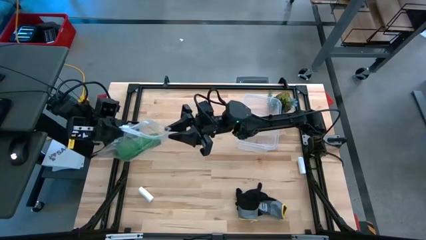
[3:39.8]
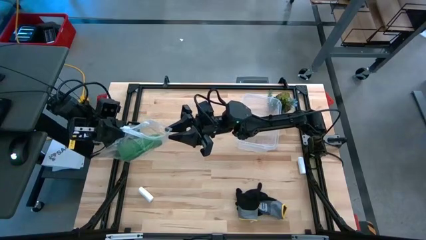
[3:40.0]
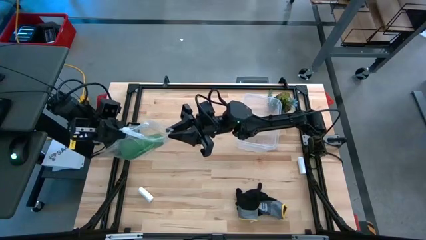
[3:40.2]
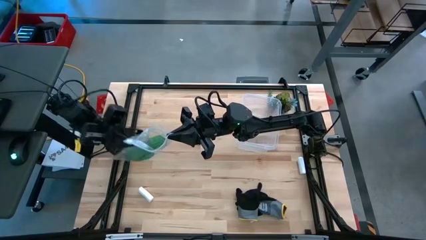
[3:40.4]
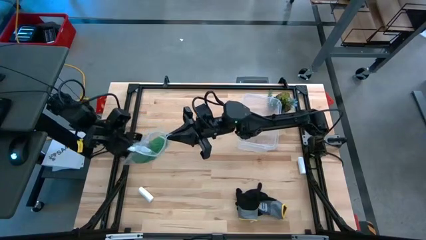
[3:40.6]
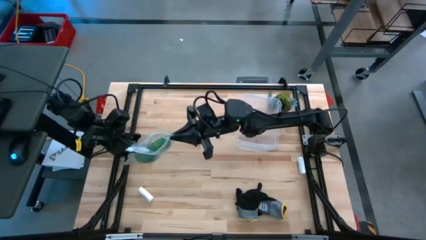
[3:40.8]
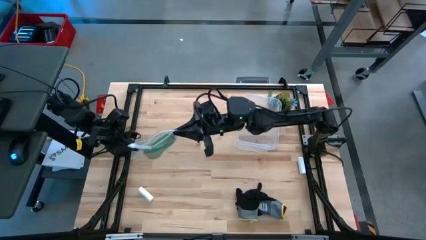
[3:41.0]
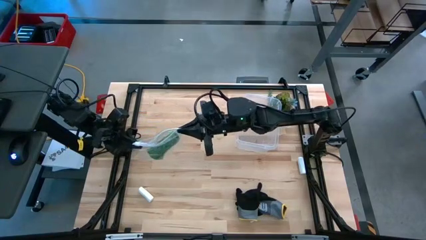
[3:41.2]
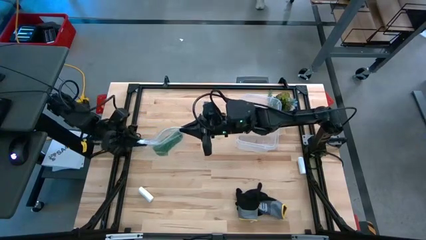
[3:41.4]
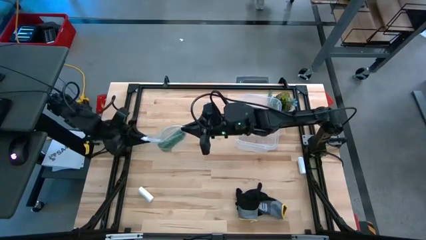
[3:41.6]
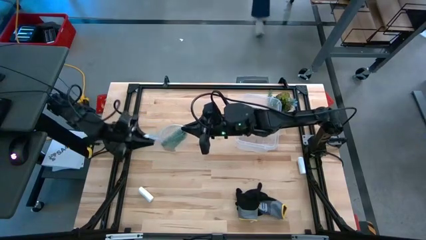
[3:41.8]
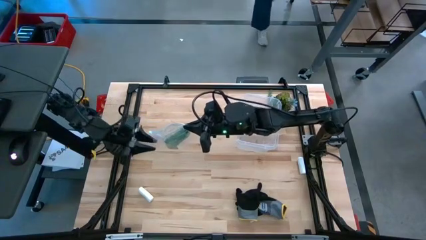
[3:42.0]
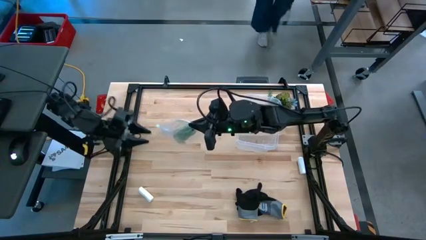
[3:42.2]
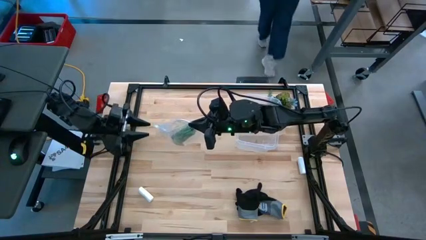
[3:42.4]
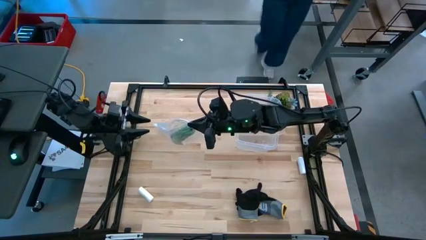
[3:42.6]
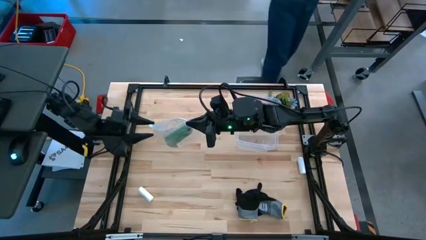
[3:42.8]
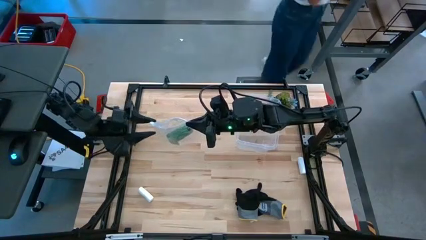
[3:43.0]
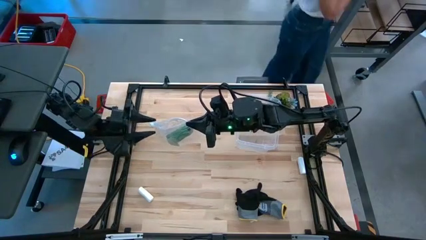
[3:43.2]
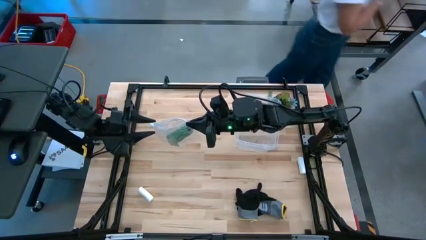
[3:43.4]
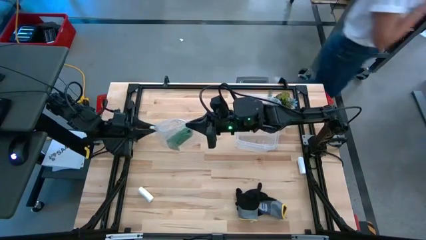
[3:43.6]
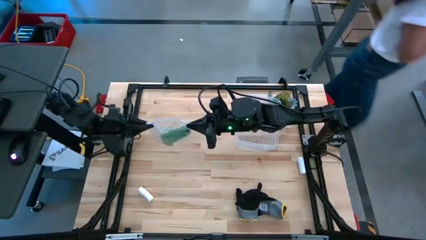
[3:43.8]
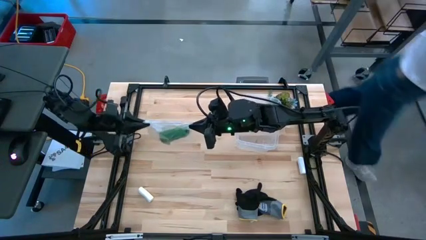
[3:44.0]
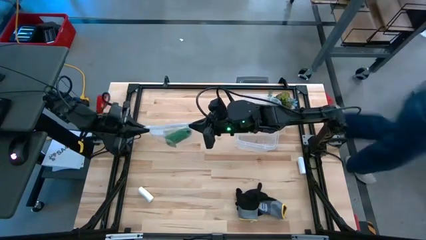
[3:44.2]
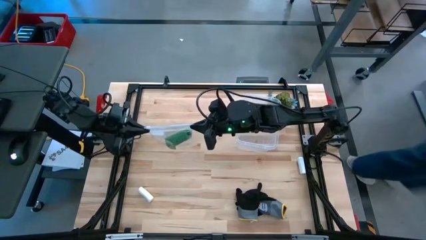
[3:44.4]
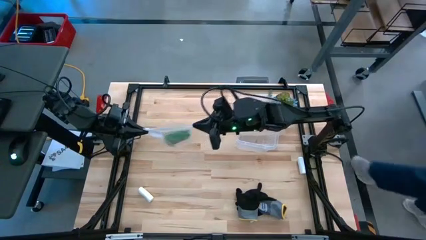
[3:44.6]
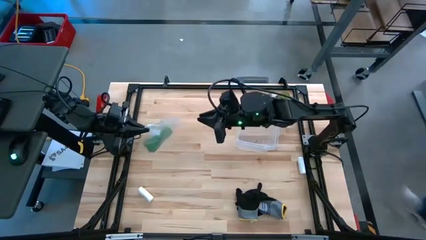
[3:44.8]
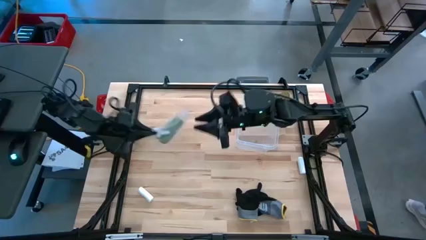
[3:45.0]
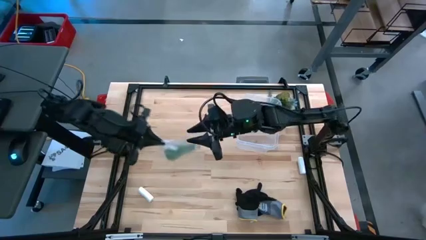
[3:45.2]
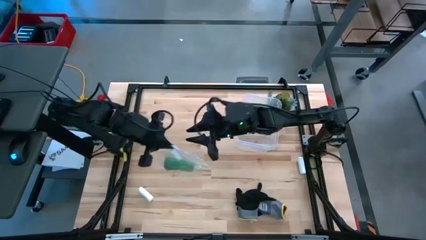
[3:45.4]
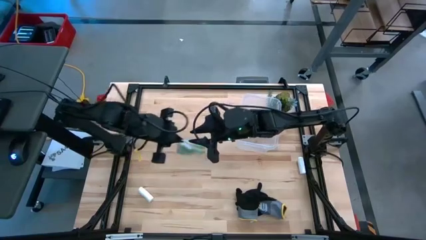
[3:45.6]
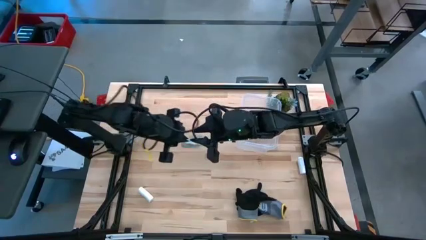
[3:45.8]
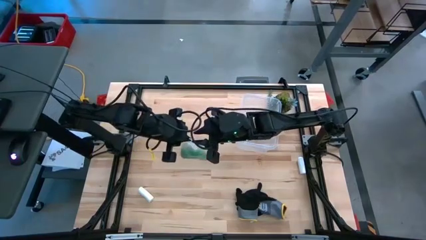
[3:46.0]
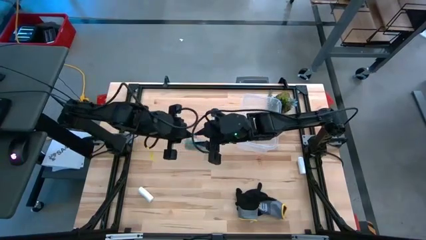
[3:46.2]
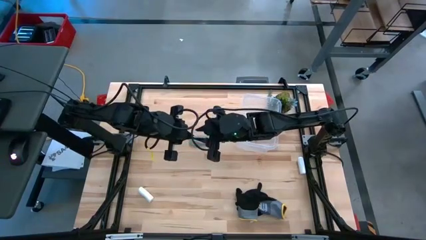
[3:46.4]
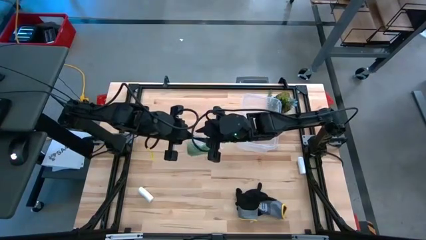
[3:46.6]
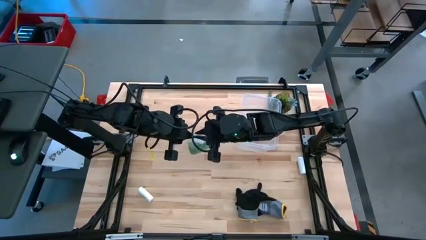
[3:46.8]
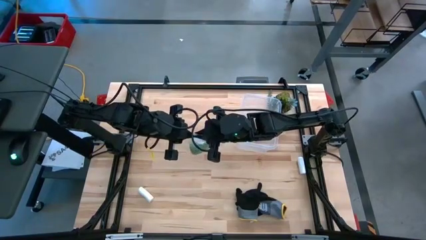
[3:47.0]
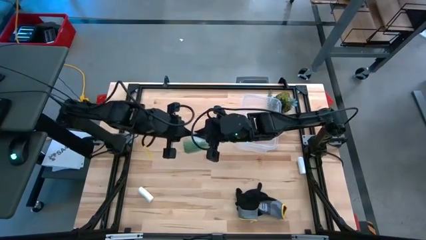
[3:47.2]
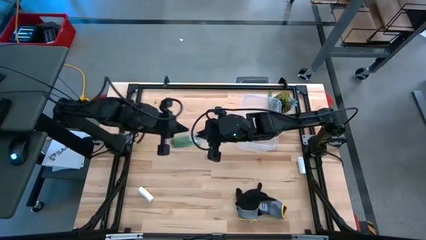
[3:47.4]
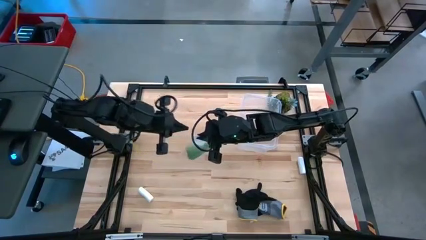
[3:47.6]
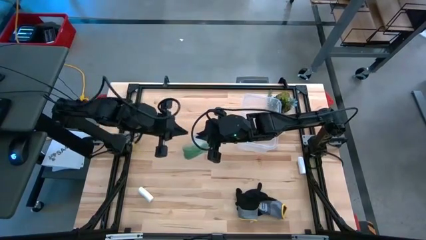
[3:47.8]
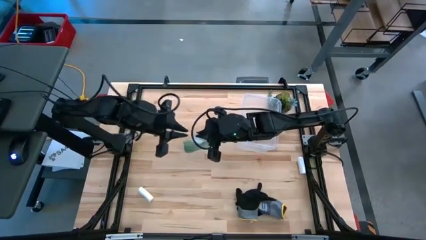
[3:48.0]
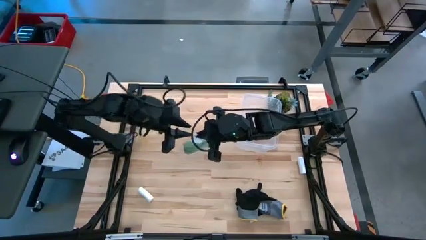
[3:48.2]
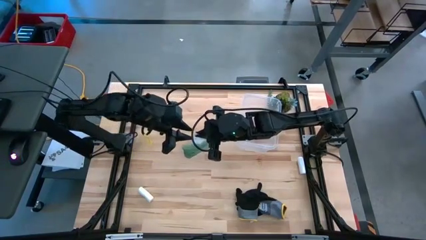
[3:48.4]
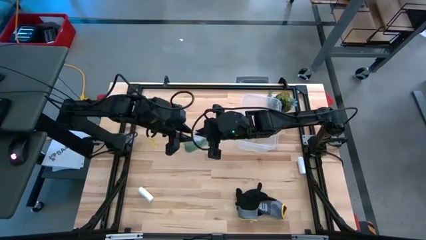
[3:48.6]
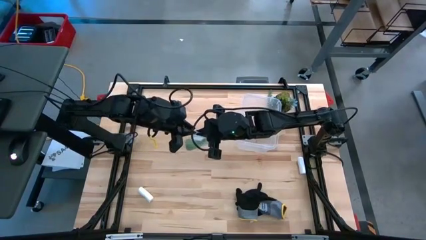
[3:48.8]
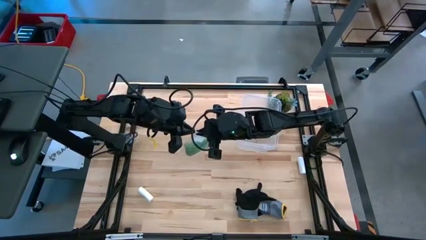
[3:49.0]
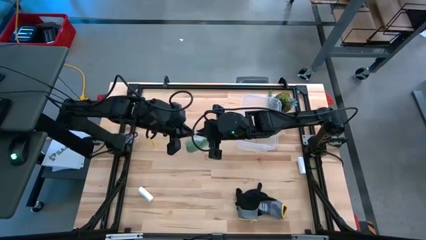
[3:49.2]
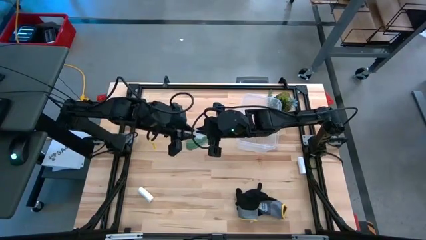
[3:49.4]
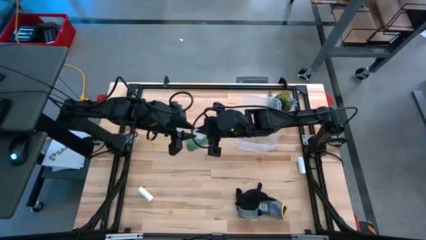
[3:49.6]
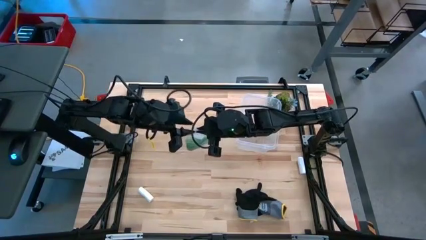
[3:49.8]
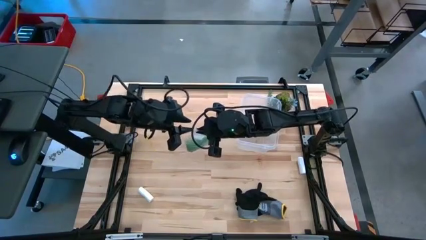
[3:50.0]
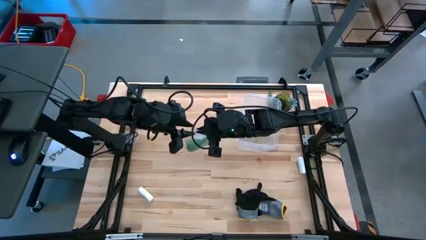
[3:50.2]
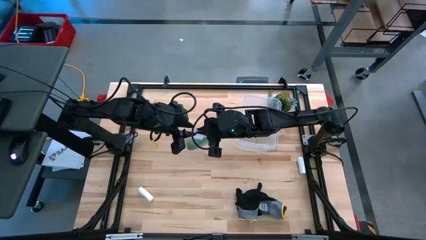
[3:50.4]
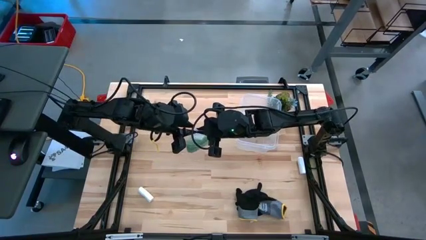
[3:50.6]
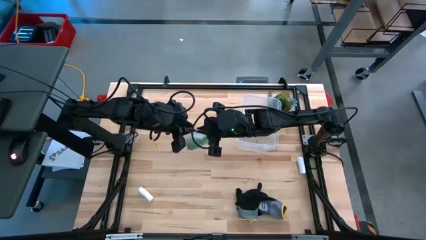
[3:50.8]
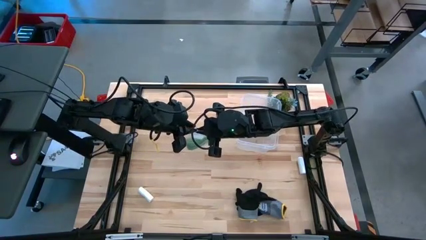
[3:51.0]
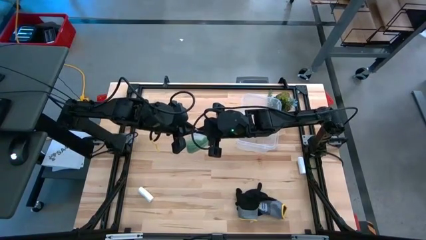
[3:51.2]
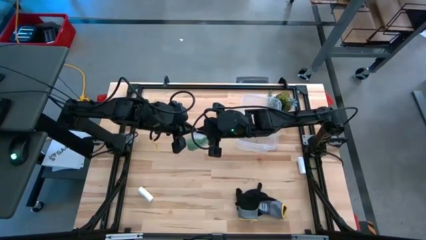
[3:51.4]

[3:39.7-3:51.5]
Task: Roll bandage
Close the transparent zip bag

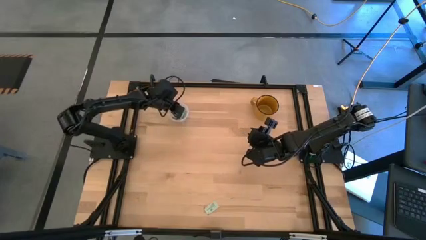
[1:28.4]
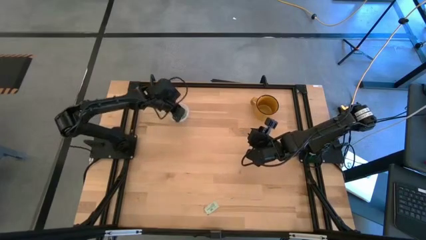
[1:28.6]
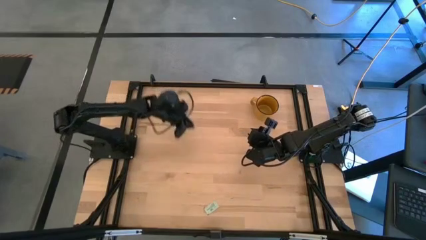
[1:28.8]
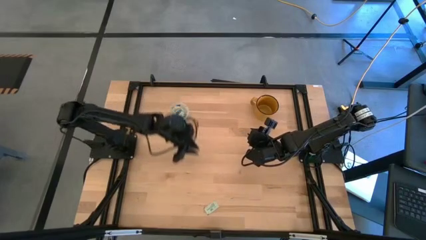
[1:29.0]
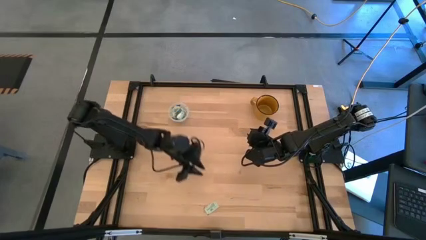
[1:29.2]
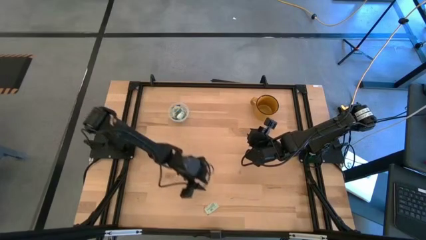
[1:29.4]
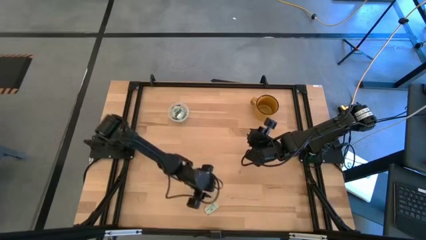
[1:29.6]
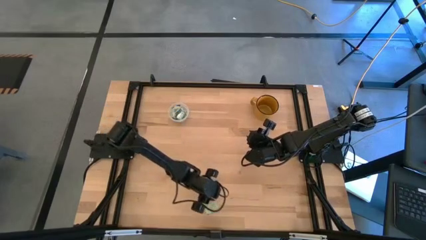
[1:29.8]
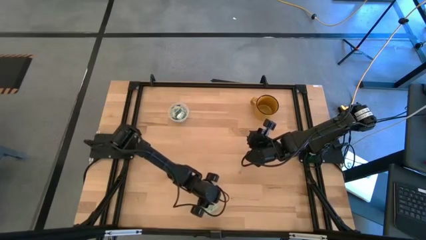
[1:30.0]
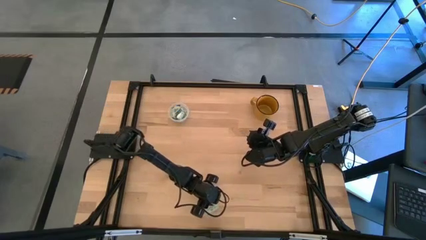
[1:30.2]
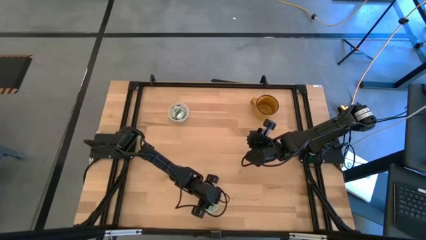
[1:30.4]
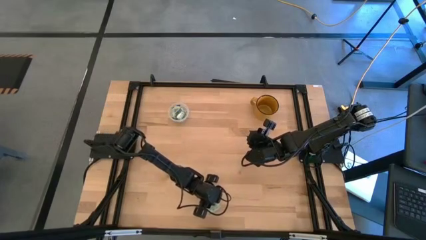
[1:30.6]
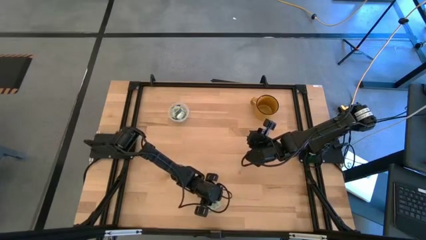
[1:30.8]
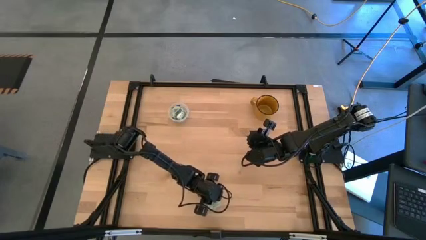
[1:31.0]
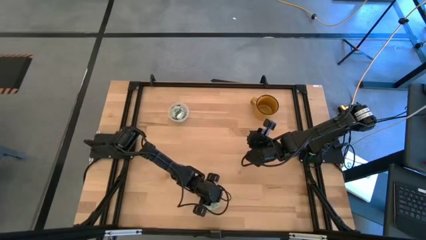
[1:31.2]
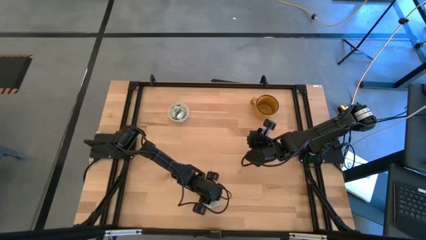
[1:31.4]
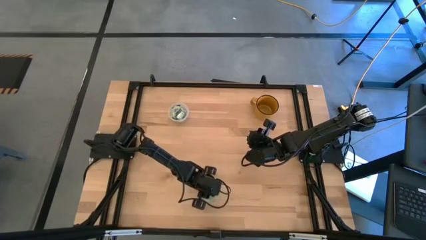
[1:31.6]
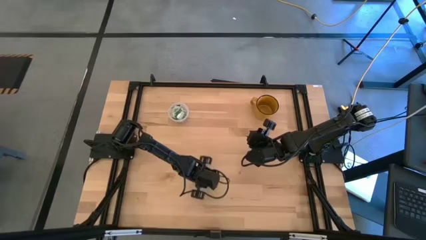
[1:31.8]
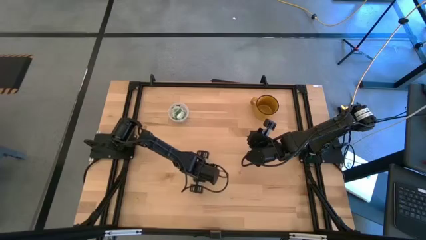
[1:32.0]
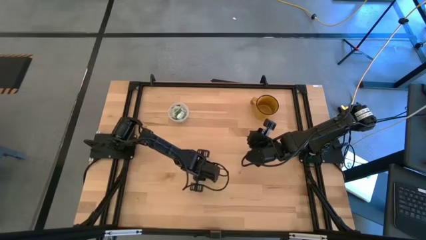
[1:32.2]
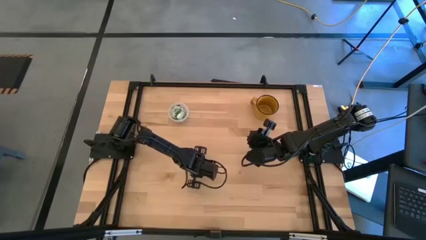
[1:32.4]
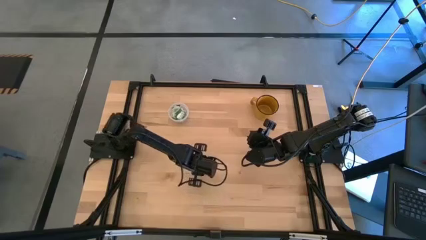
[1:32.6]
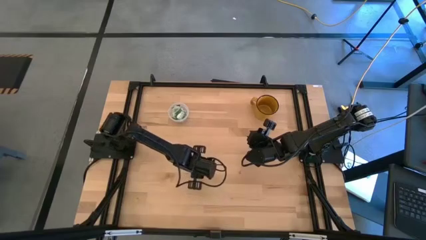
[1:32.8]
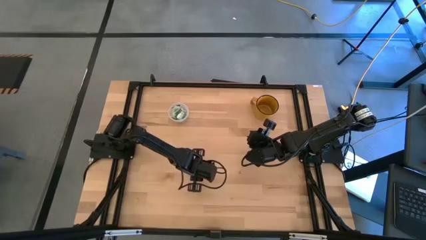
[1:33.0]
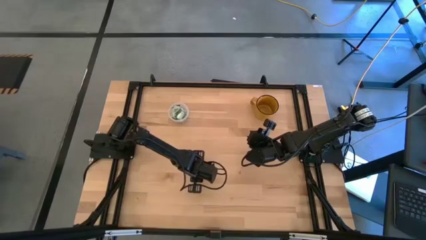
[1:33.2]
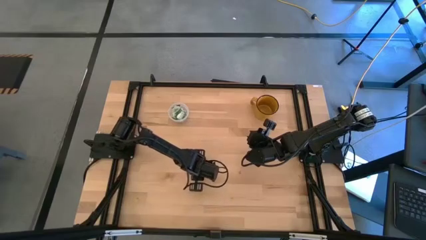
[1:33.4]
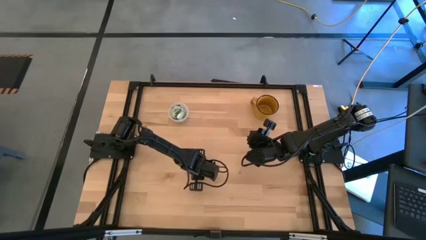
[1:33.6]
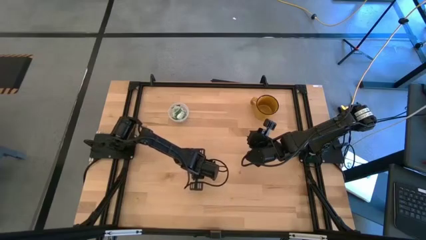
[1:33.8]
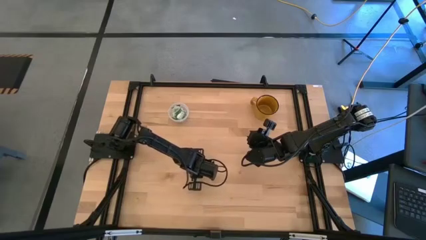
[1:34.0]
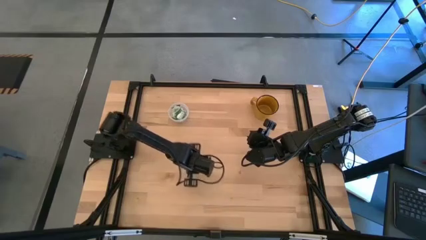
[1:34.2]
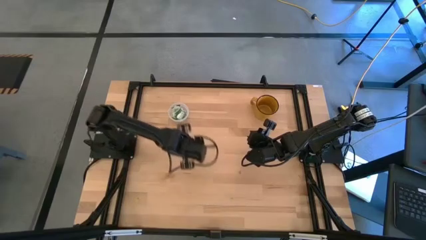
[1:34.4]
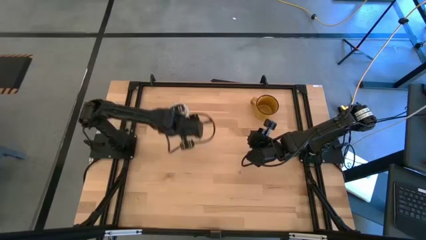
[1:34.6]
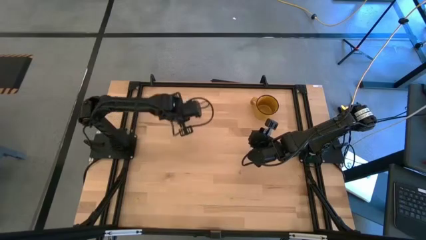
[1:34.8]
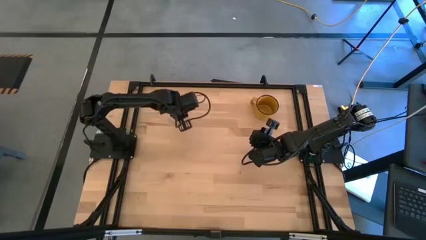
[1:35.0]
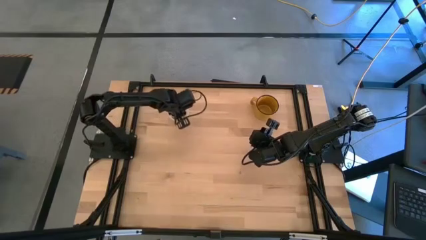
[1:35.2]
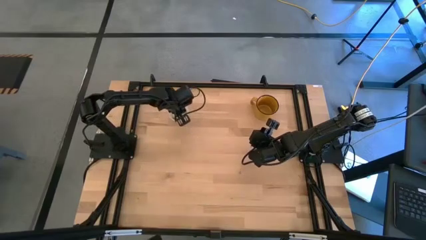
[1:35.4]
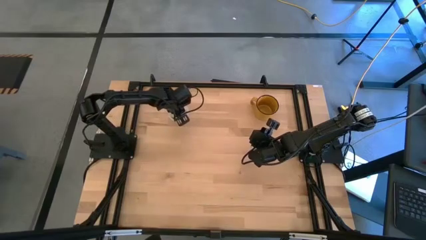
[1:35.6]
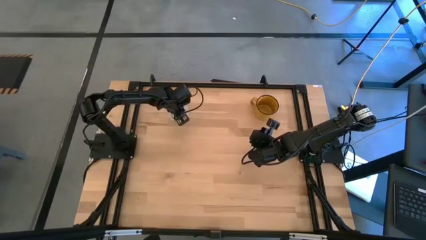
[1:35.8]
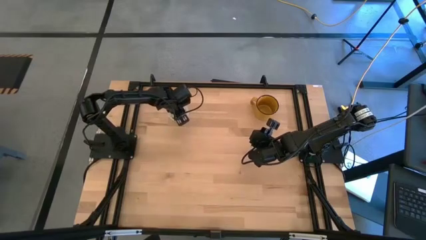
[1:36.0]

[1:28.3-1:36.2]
Task: Pick and place Stevia / Truvia into bins
Put the stevia packet into the transparent container
